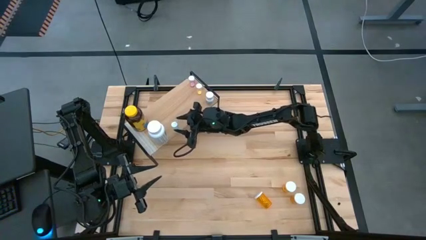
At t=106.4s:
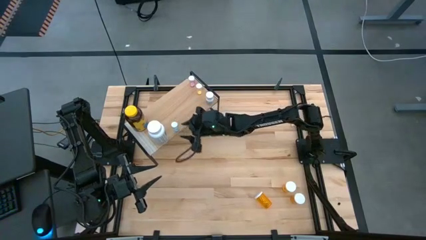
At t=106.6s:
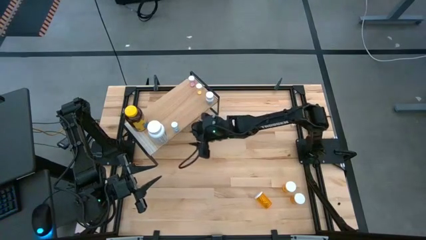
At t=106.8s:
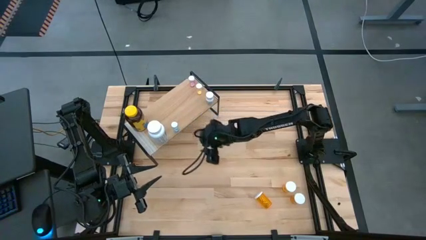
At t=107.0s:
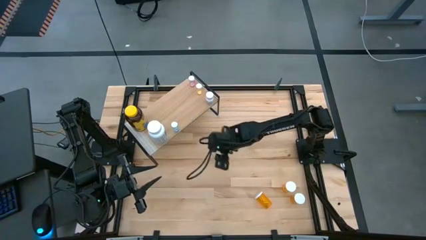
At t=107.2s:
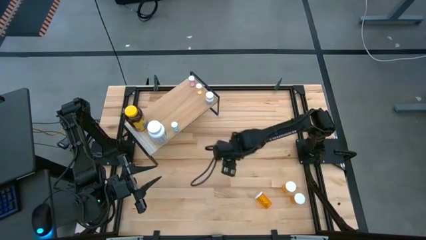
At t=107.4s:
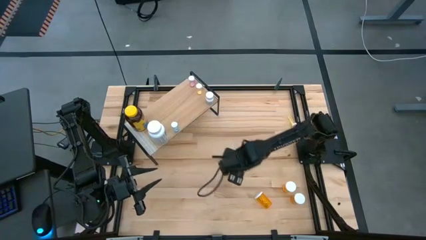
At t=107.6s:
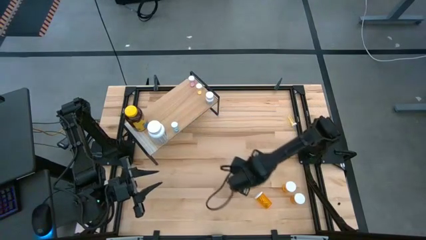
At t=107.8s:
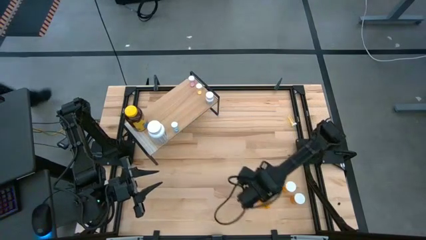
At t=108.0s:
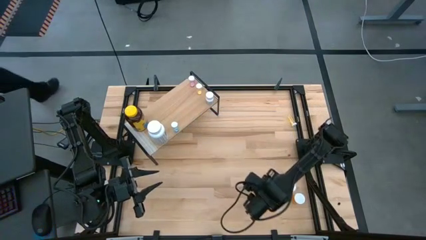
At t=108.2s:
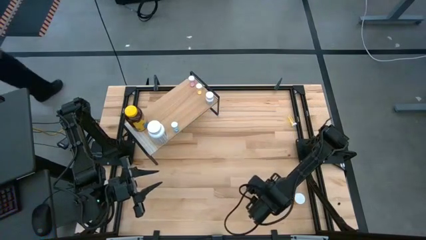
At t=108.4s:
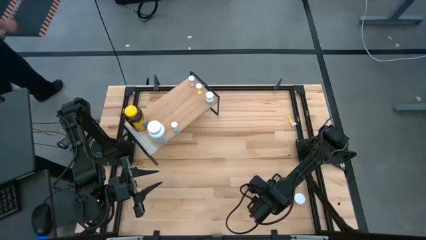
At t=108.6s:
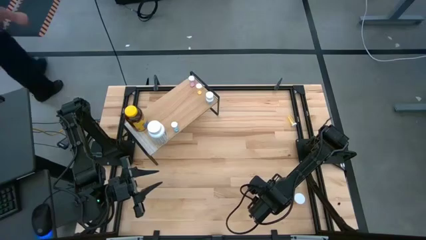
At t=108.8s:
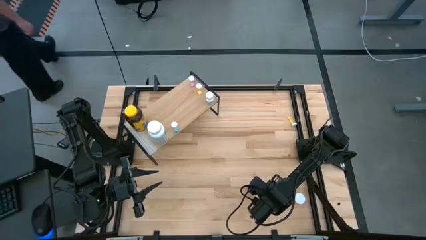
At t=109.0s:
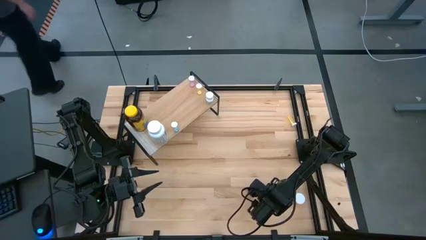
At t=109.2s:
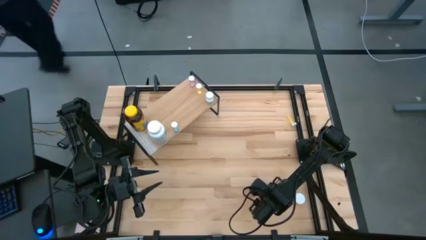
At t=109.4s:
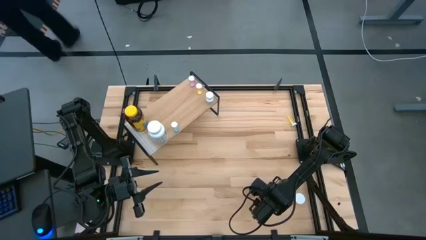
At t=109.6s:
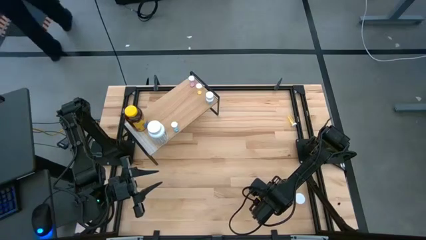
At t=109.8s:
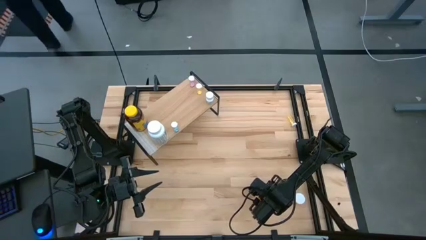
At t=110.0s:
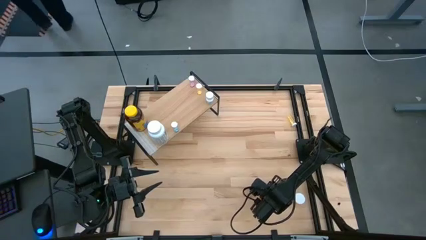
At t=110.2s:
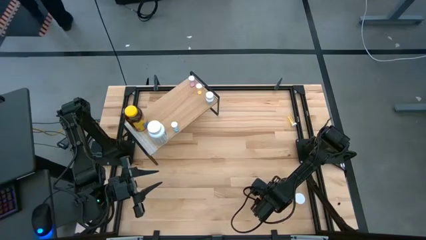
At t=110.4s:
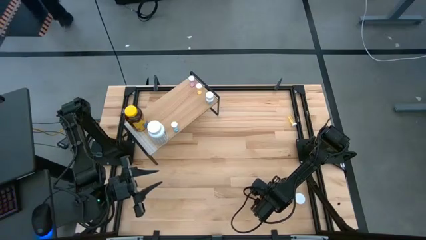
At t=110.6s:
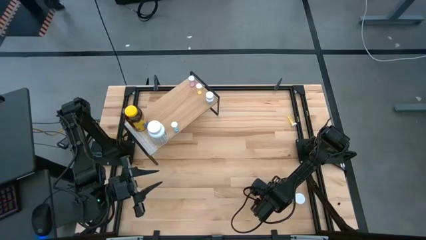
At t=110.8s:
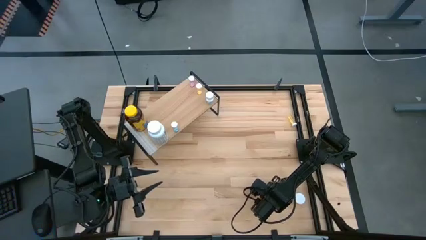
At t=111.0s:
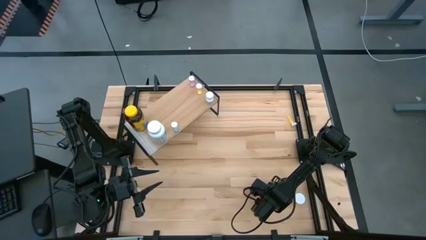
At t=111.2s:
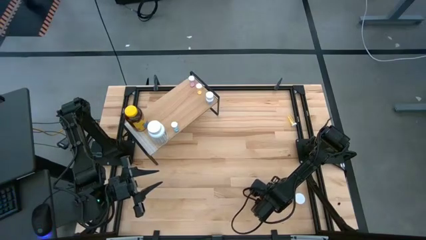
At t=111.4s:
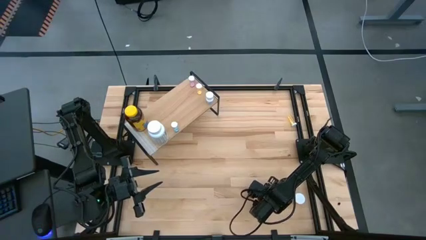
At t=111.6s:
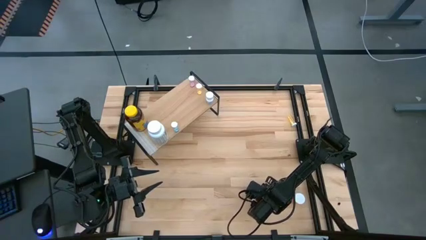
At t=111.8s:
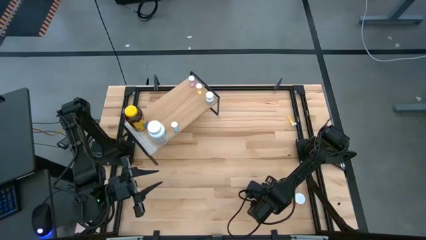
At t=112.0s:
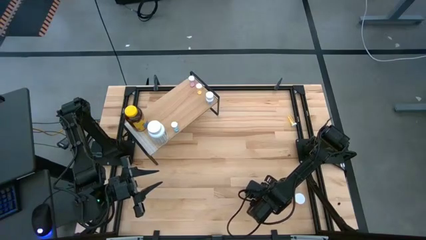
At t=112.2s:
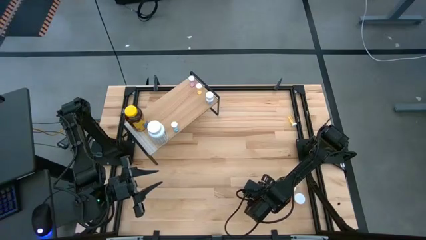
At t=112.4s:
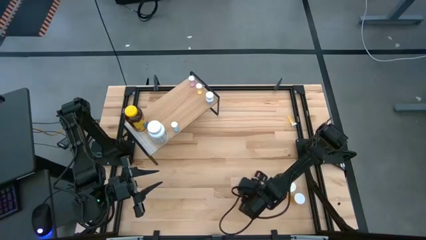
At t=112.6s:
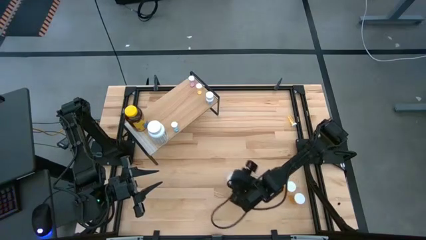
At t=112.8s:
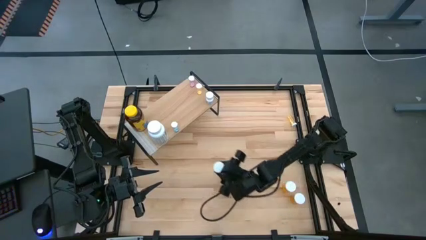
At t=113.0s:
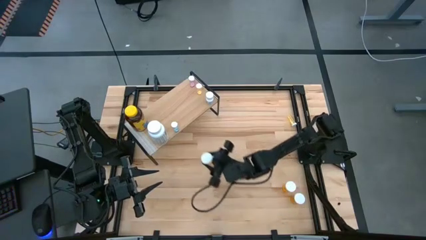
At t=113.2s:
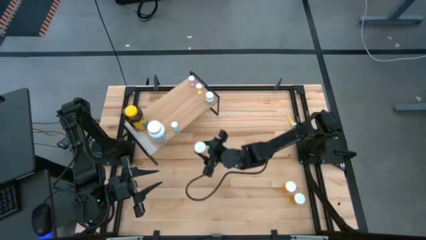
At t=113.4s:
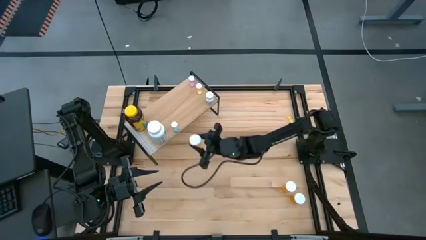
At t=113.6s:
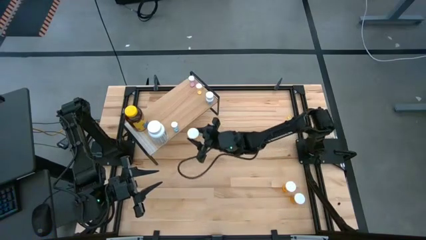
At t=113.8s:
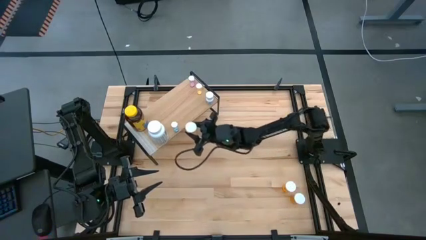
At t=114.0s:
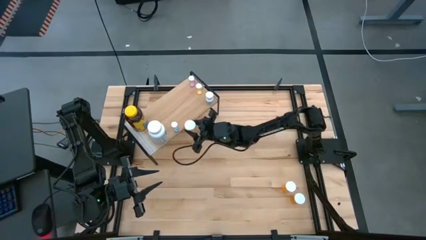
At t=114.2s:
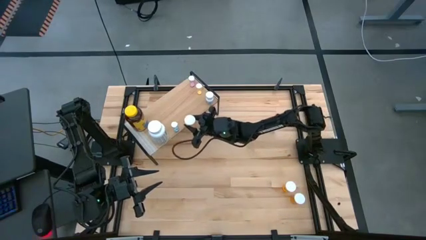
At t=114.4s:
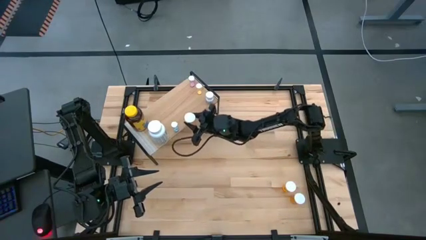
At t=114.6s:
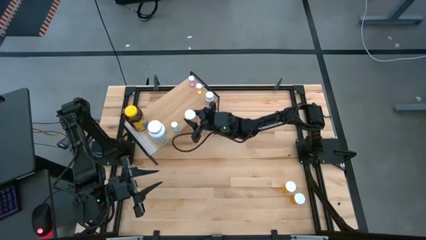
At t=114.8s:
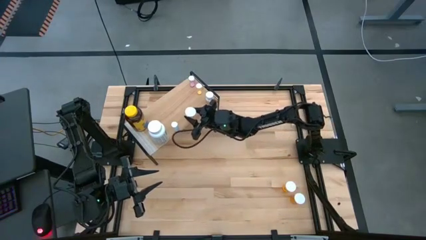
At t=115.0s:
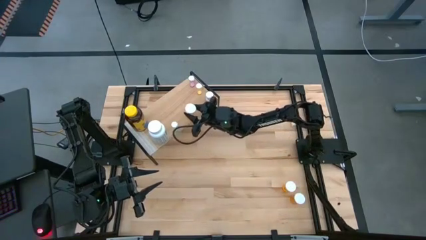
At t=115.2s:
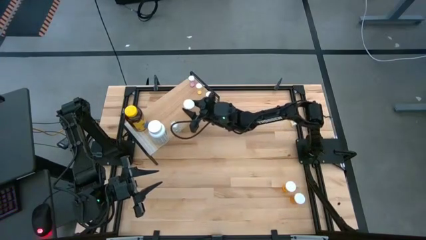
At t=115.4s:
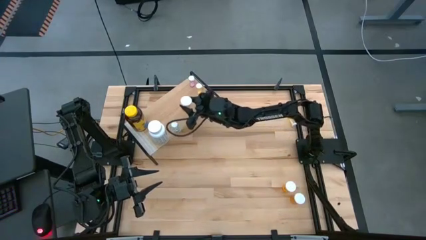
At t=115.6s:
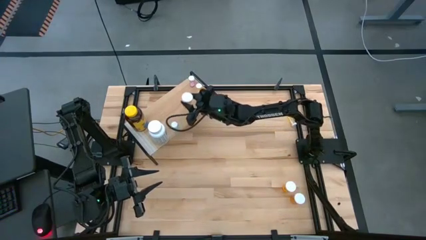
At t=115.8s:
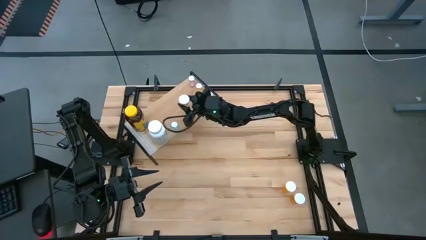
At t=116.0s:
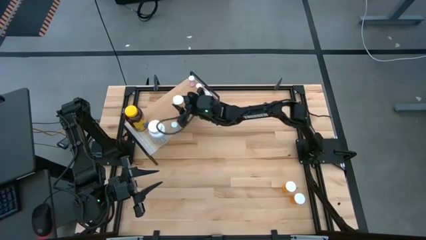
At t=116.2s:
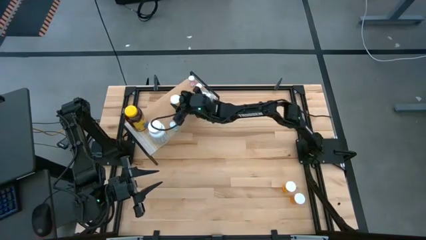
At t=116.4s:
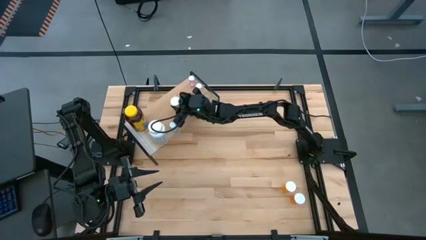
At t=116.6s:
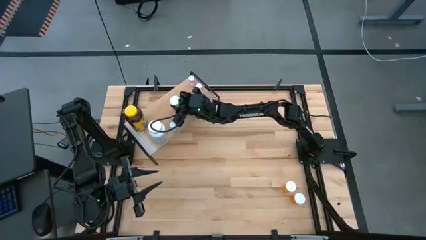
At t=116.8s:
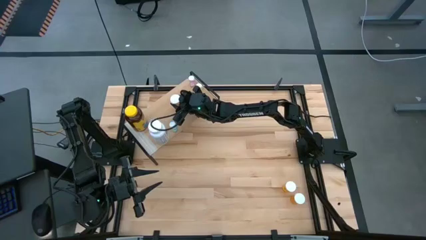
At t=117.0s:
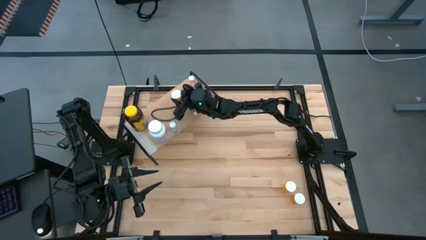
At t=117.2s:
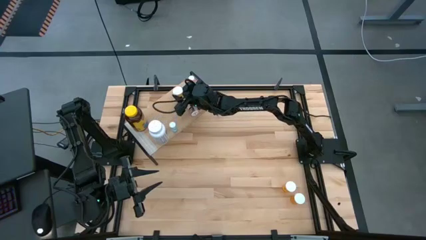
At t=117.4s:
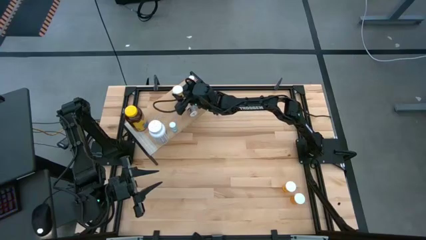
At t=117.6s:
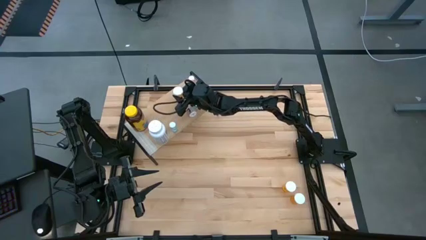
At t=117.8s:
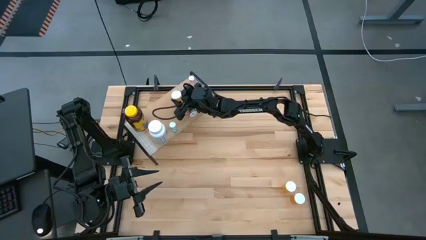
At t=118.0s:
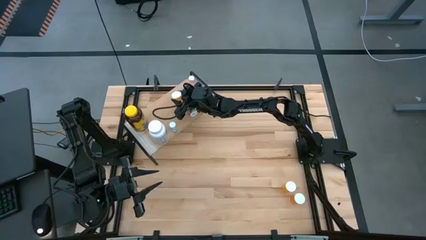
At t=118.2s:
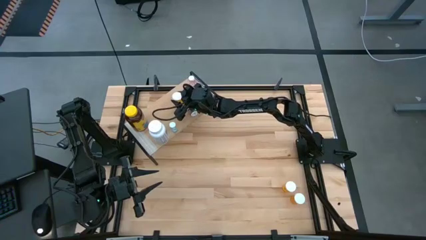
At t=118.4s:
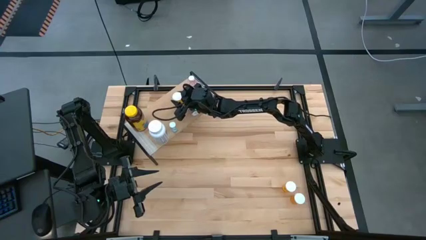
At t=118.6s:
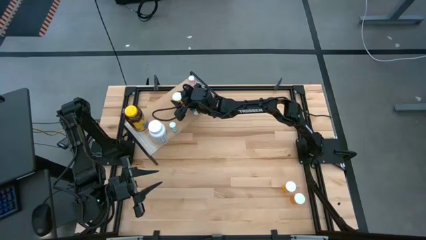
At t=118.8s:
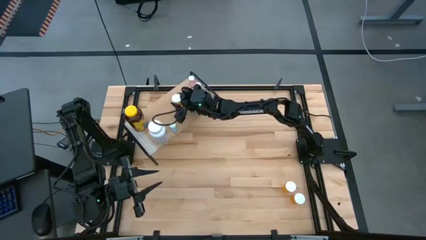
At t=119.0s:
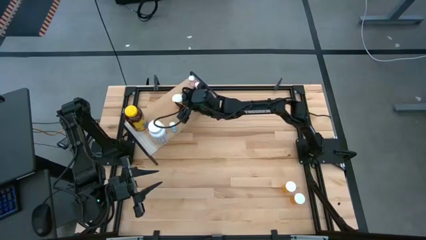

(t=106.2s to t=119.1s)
Task: Pick and place medicine bottles onto shelf by color
Put the bottom left orange pill bottle on the shelf
